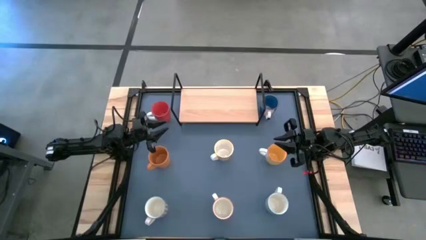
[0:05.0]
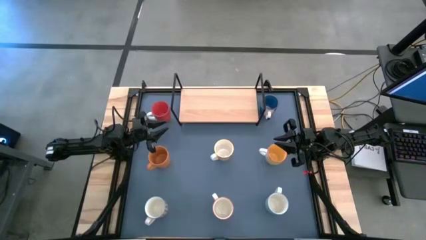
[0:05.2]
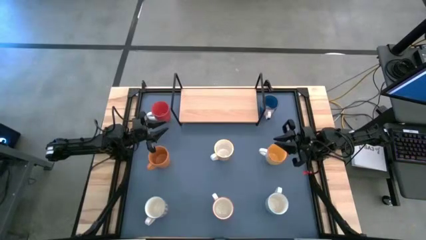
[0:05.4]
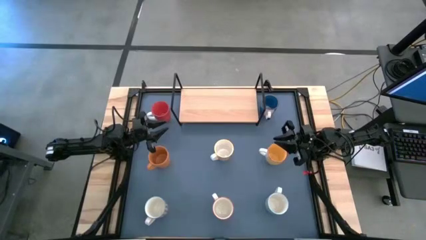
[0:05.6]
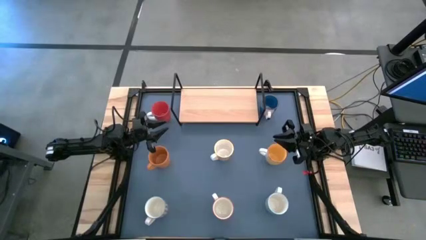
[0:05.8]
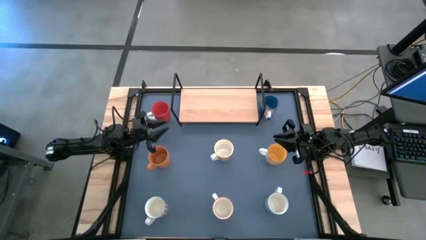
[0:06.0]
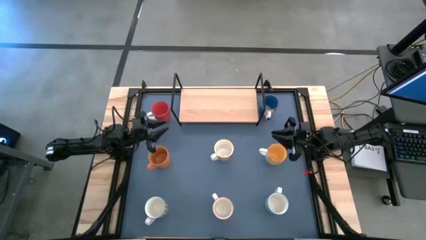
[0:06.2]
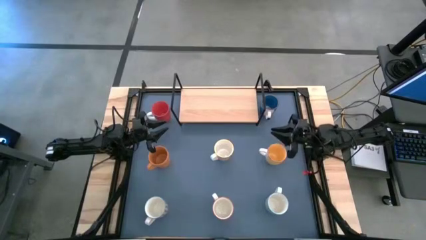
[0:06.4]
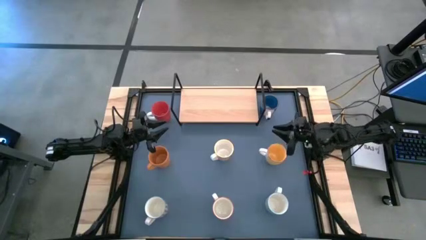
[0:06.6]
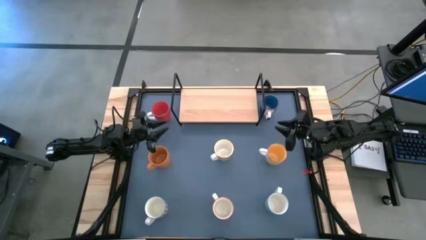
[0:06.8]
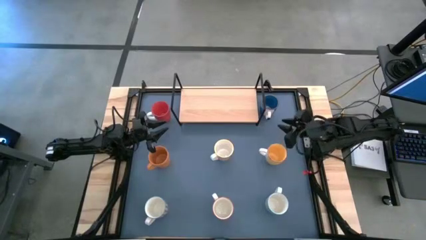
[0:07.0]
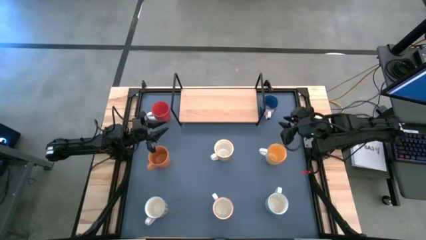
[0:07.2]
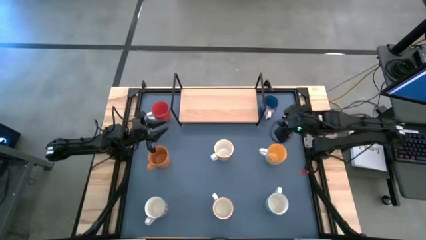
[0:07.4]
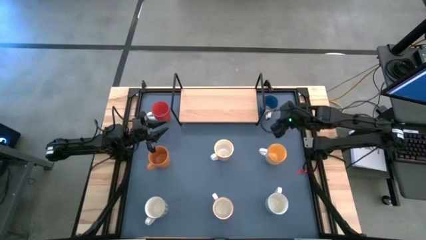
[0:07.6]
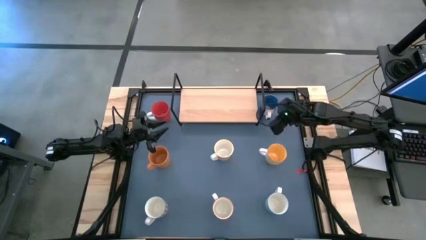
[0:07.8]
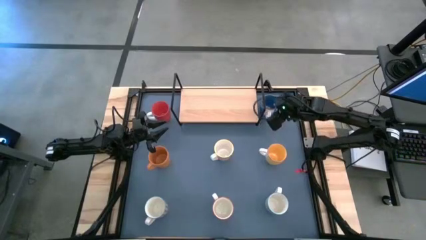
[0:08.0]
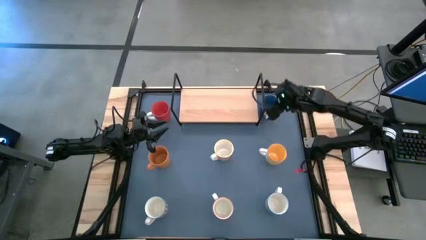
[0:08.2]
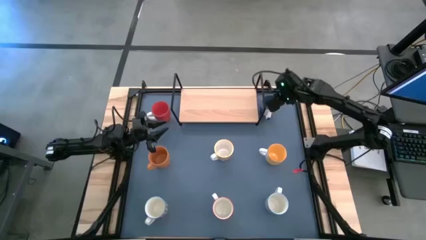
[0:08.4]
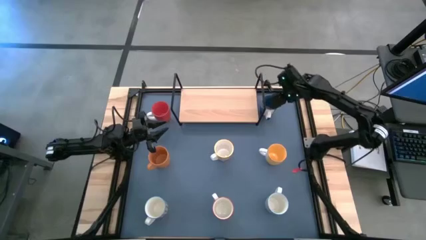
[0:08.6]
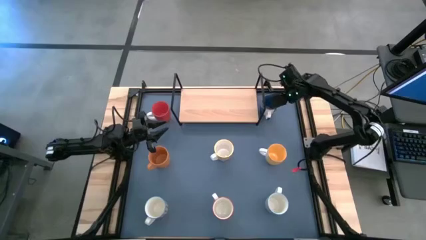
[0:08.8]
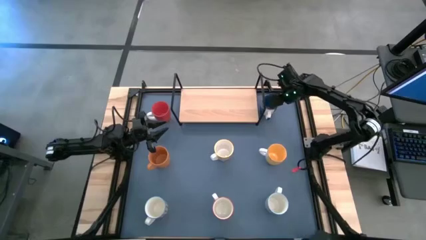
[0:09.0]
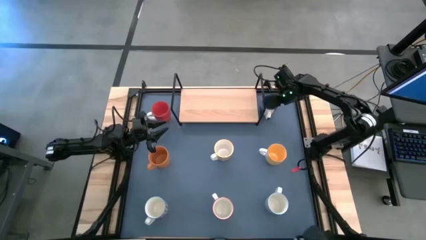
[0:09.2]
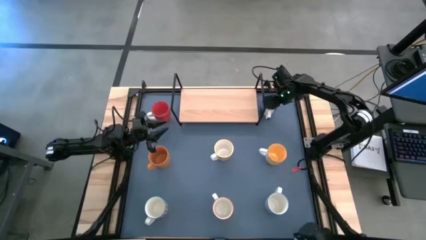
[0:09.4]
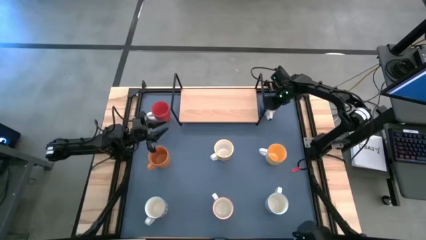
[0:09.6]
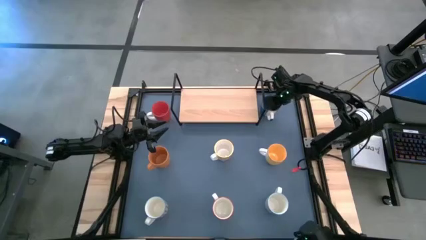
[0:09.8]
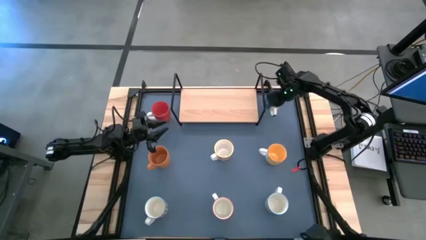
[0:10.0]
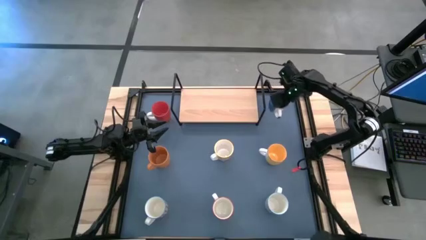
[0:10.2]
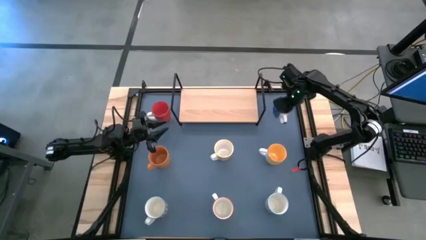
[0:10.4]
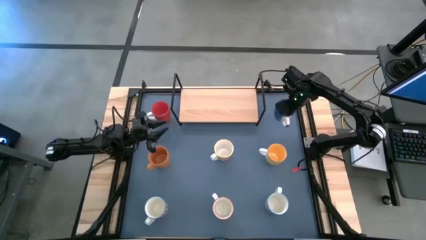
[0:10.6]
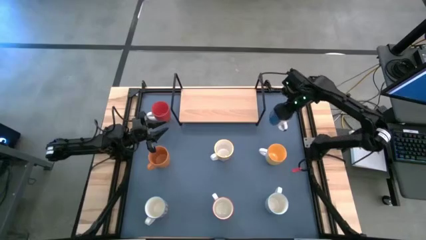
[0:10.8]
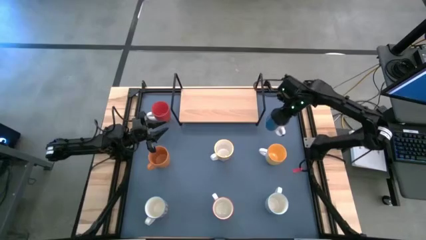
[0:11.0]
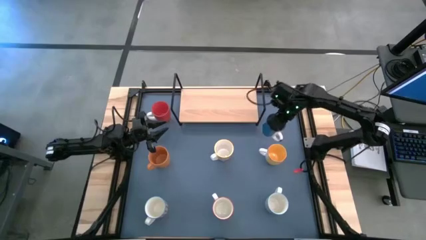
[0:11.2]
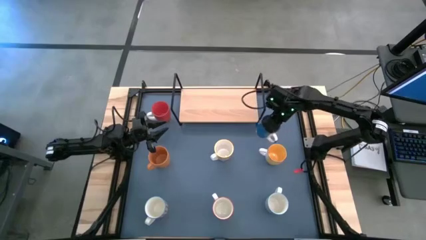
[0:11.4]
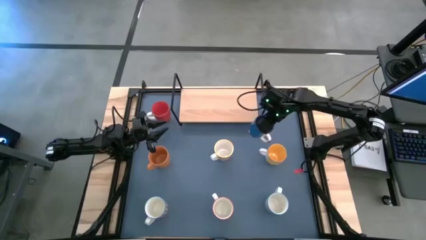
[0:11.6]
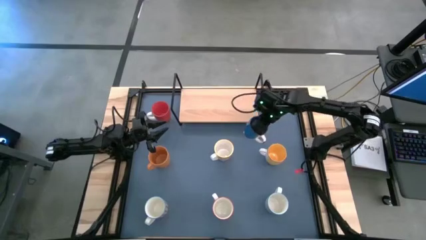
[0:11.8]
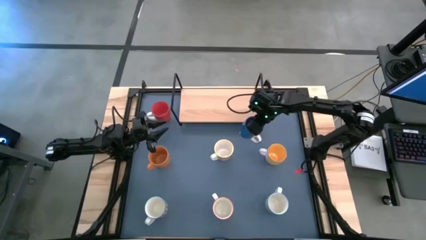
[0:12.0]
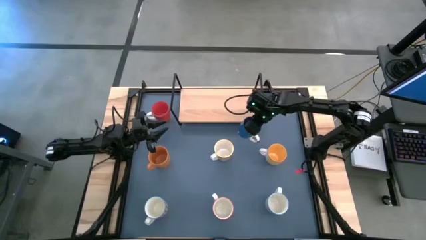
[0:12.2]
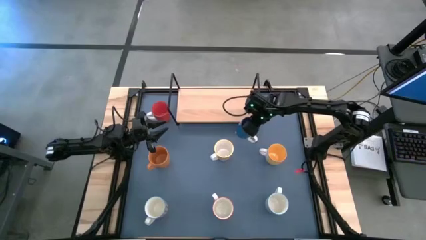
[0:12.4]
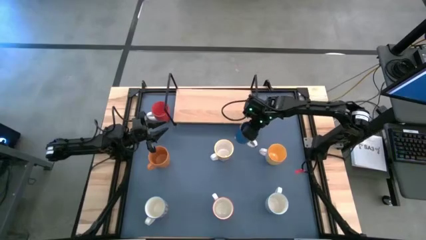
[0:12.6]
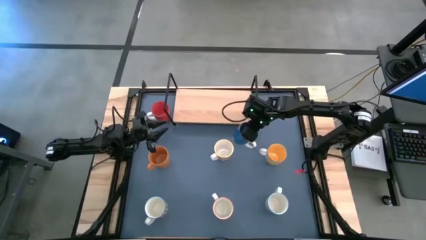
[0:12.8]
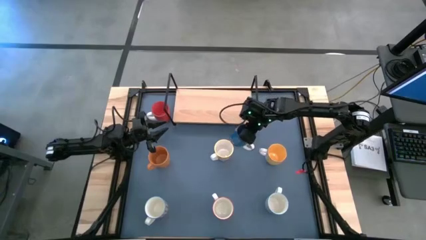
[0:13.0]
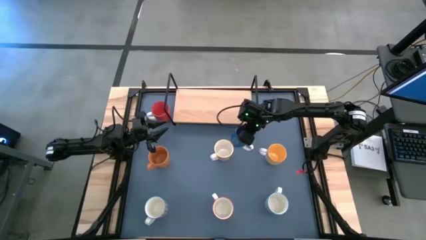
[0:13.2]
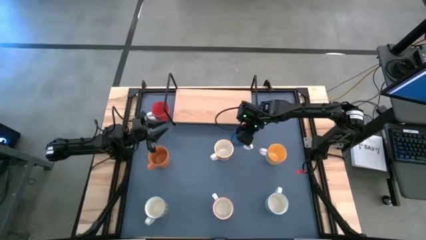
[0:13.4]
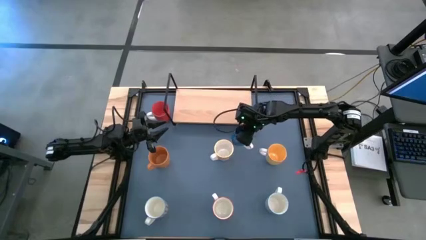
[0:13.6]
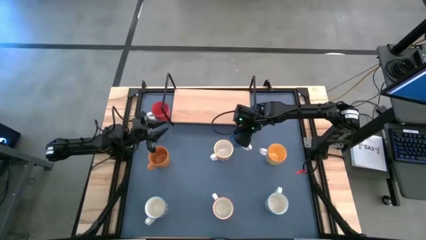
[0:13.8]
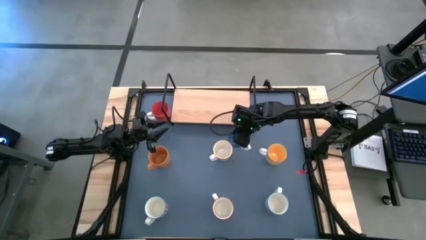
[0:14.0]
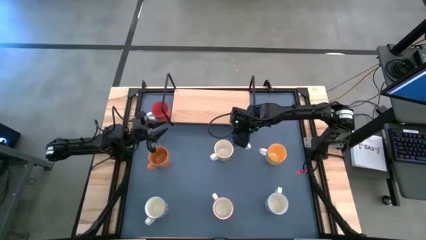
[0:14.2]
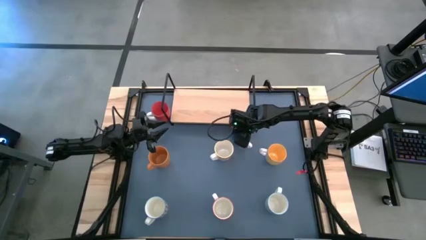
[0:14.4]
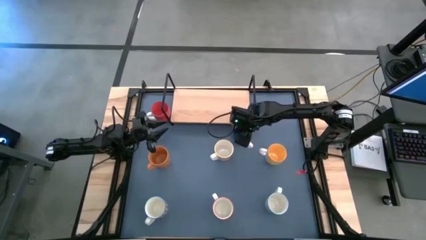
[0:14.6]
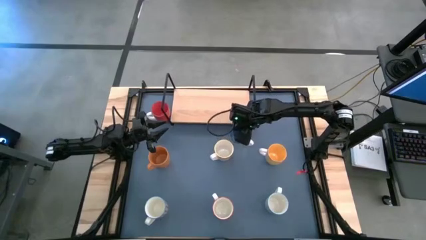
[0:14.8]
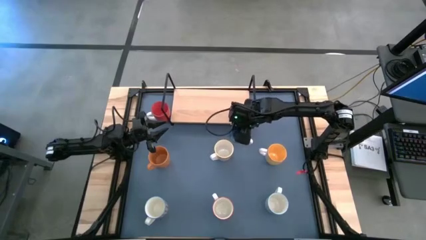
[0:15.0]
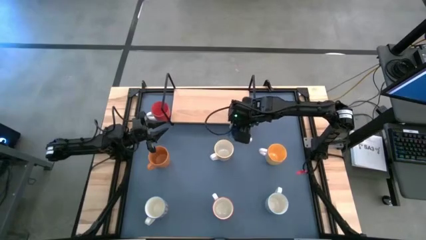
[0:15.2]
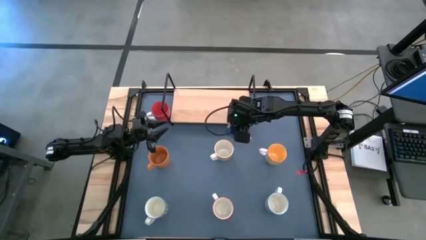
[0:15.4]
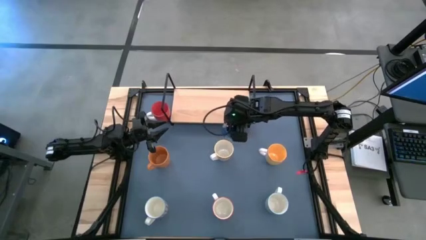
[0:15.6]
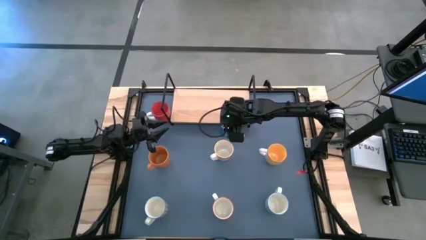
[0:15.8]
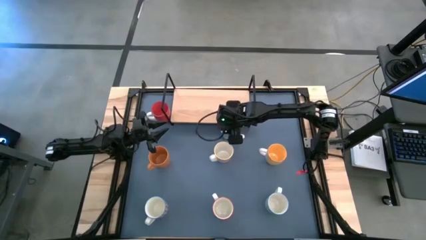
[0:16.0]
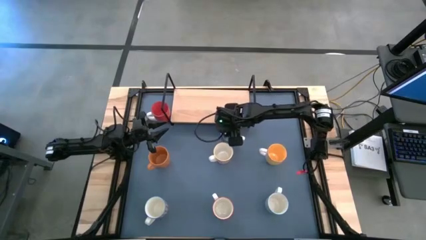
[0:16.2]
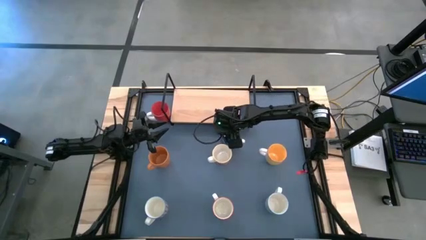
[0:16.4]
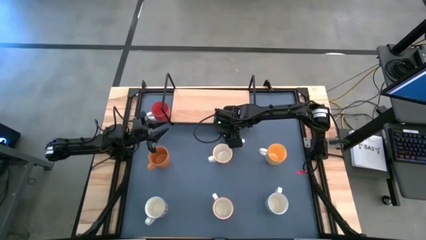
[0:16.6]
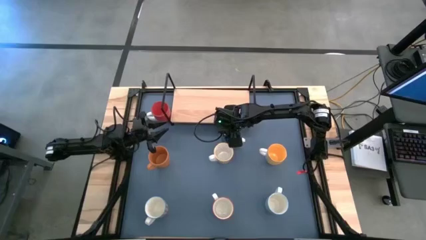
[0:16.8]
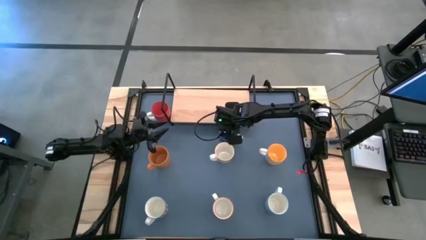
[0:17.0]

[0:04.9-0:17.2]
Task: Place coffee mugs
Move the blue cup to the center of the table

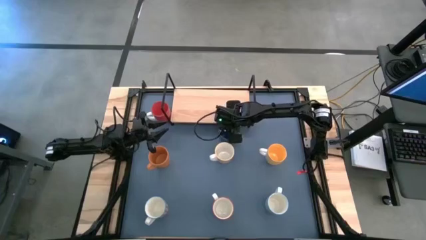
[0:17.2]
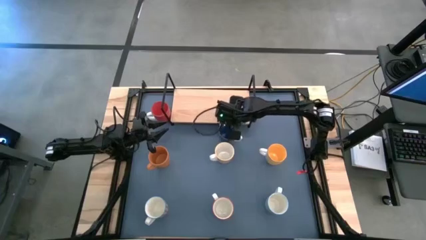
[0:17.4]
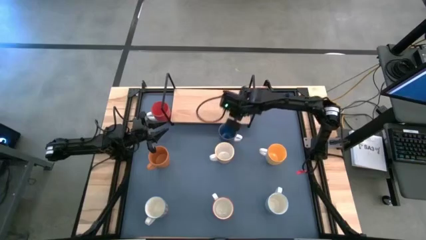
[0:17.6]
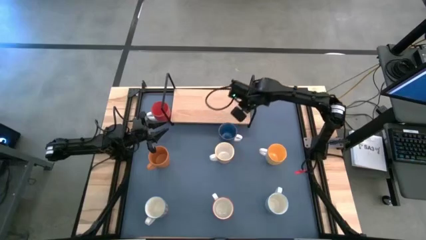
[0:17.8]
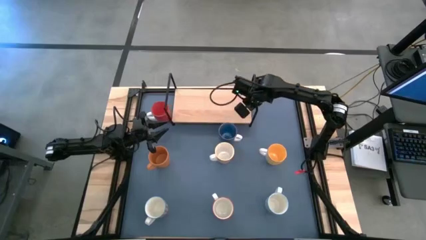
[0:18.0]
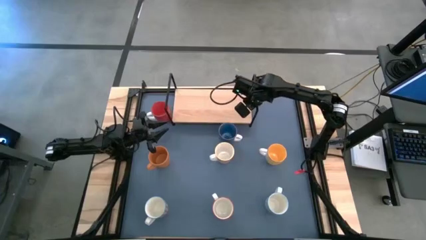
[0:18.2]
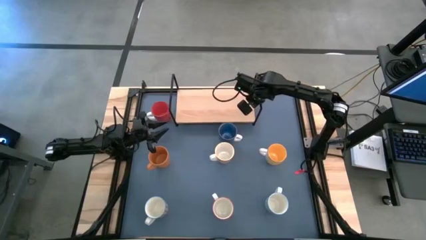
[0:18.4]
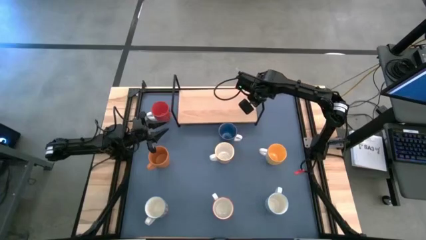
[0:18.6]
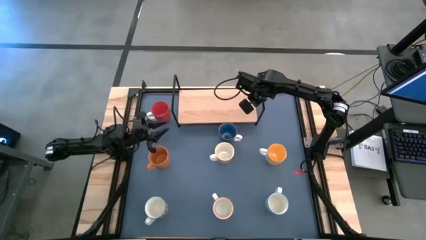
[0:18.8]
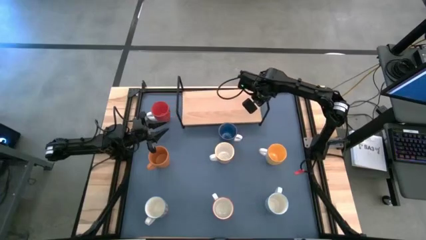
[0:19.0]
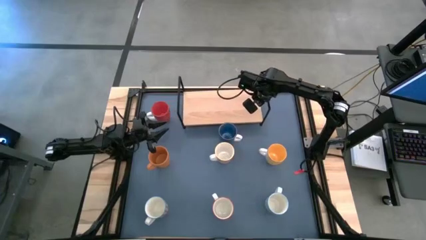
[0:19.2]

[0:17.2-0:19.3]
Adjust the shelf on the table

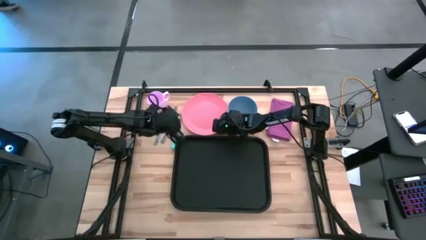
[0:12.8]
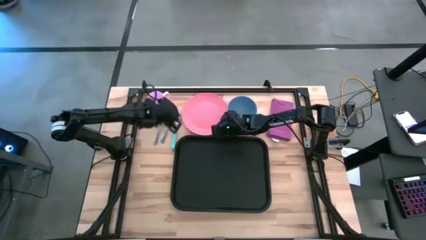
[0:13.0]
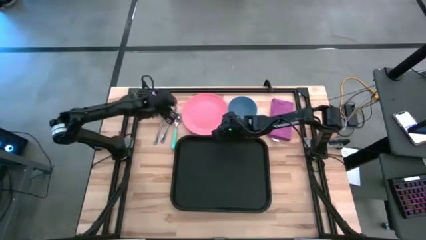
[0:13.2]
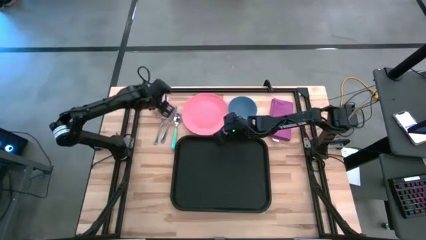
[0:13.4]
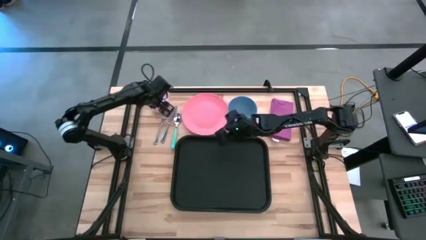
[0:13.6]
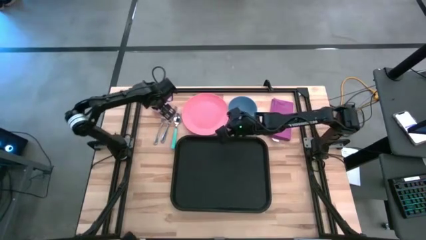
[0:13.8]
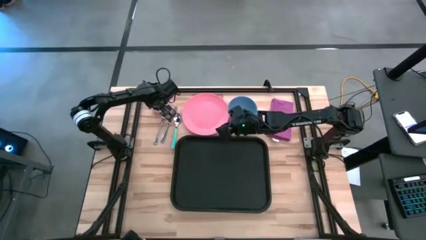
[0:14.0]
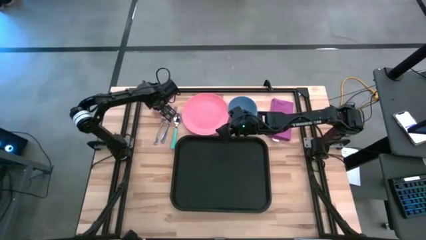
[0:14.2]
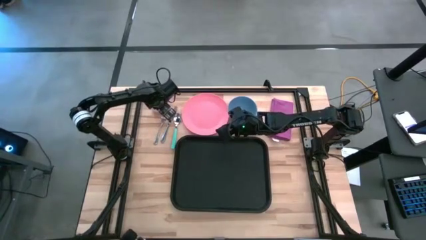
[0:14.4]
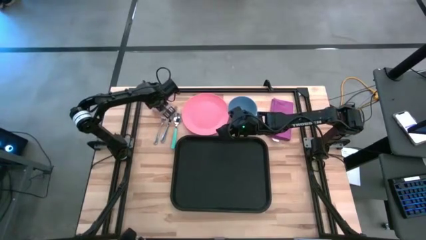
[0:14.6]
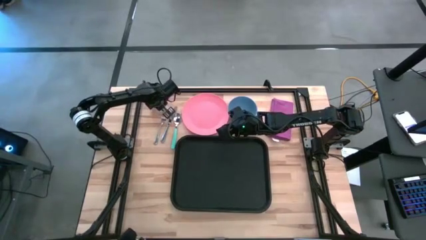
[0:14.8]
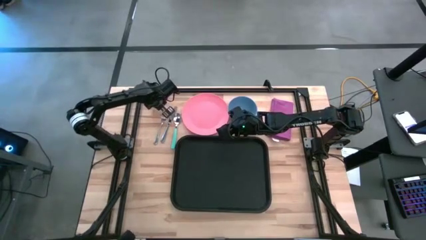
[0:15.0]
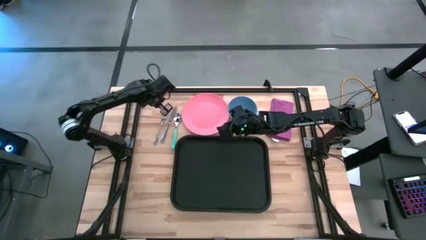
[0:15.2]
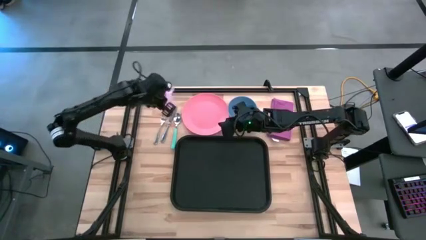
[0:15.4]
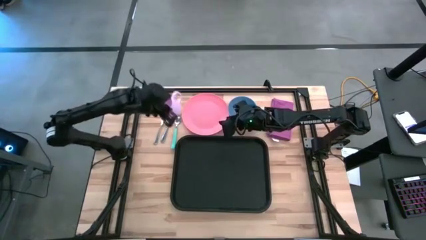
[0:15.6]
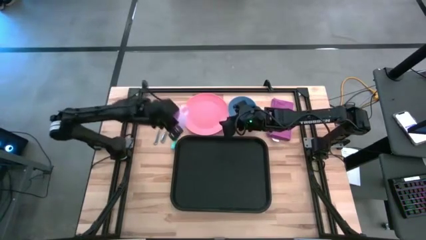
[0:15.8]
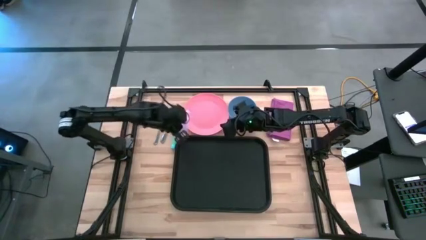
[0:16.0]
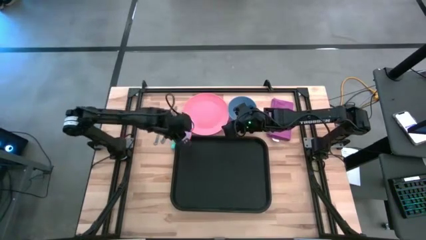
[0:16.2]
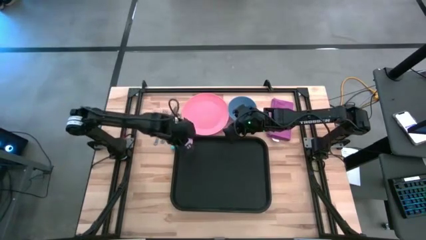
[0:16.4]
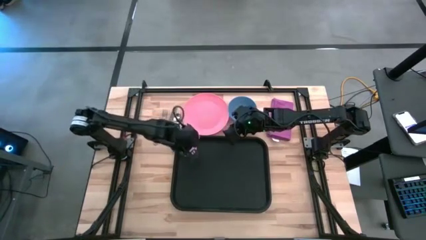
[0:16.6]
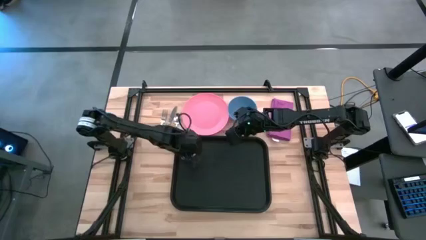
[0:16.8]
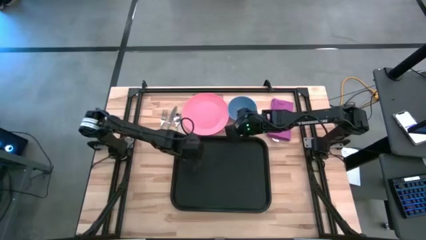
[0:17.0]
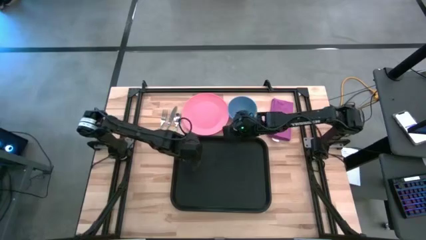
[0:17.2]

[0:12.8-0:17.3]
Task: Set up tray
Put the light purple mug on the top left of the black tray
